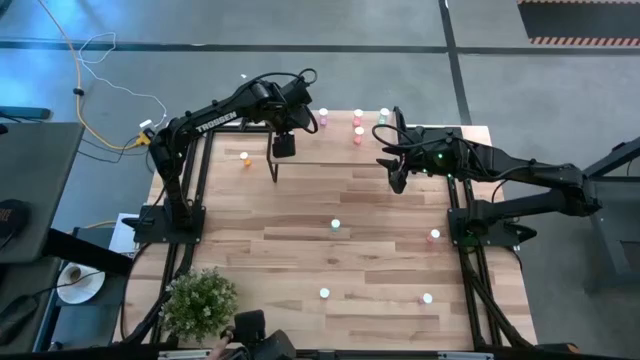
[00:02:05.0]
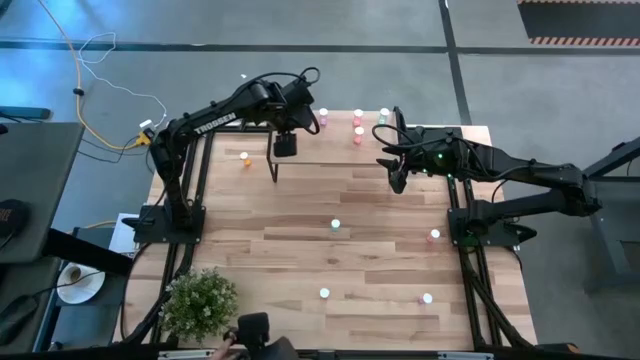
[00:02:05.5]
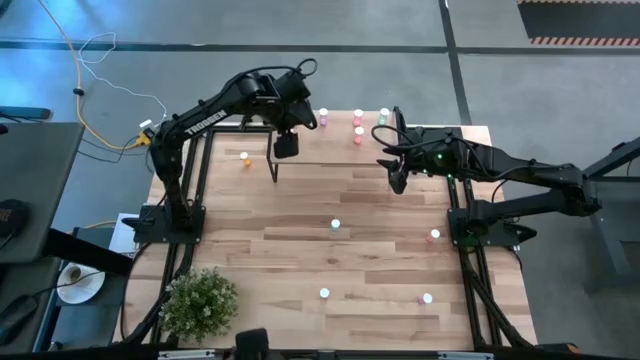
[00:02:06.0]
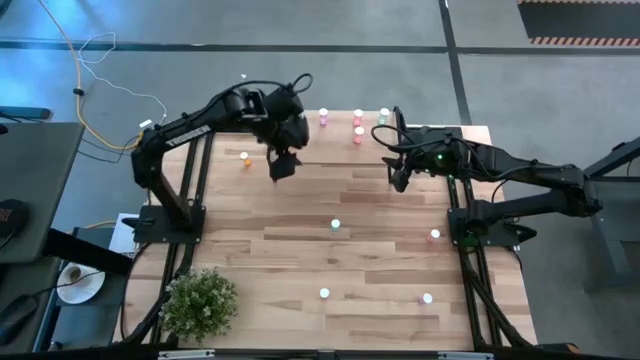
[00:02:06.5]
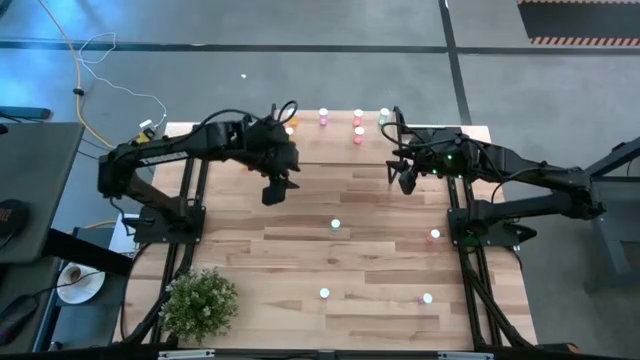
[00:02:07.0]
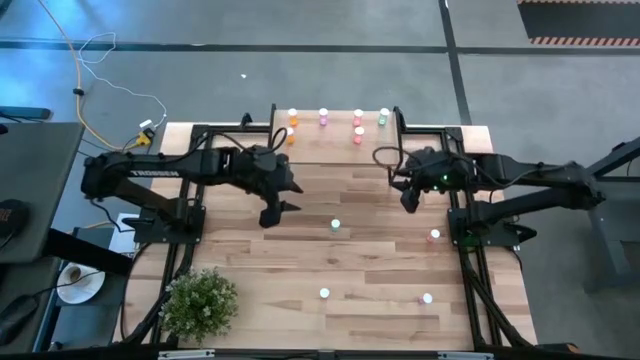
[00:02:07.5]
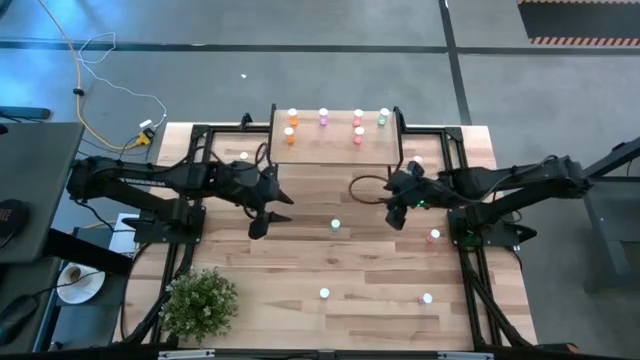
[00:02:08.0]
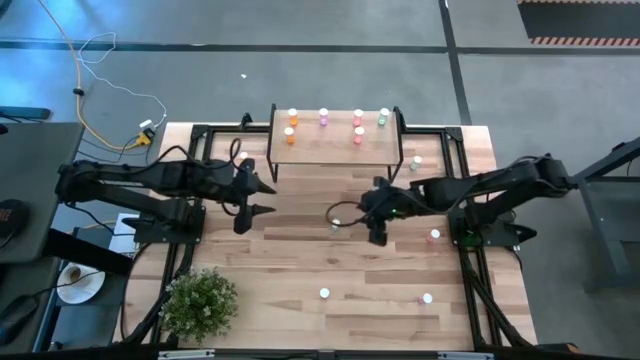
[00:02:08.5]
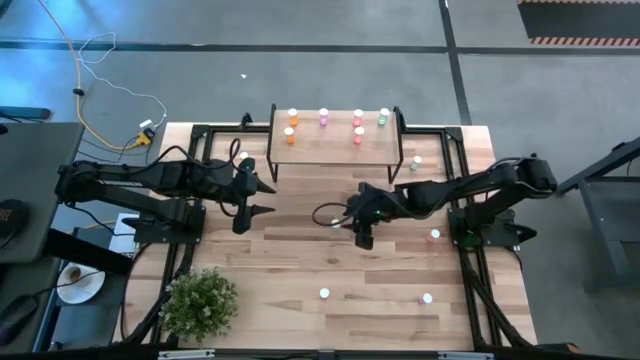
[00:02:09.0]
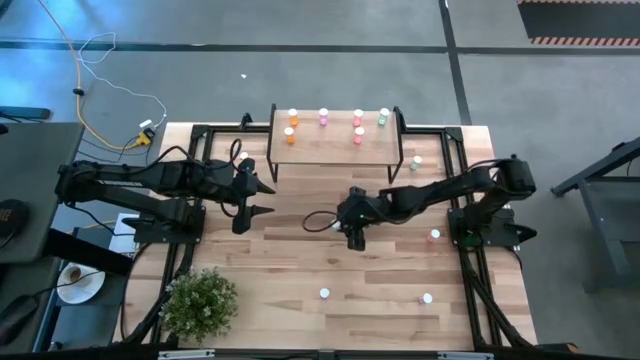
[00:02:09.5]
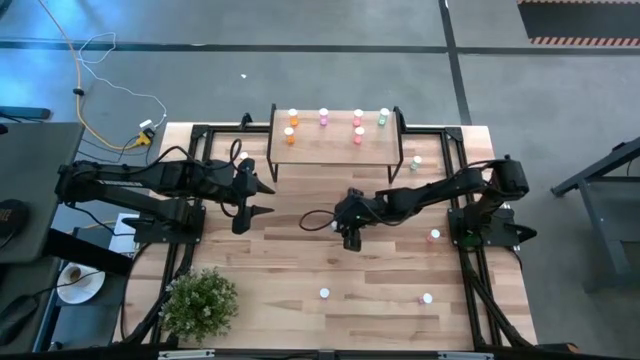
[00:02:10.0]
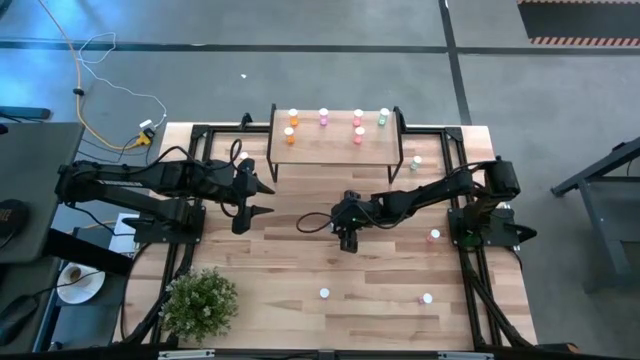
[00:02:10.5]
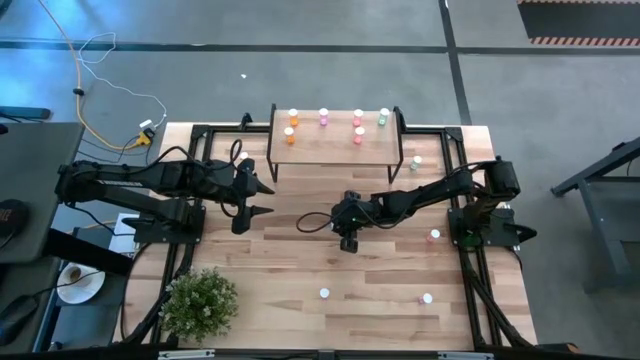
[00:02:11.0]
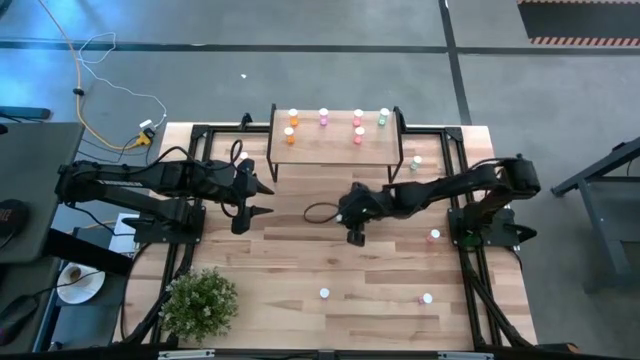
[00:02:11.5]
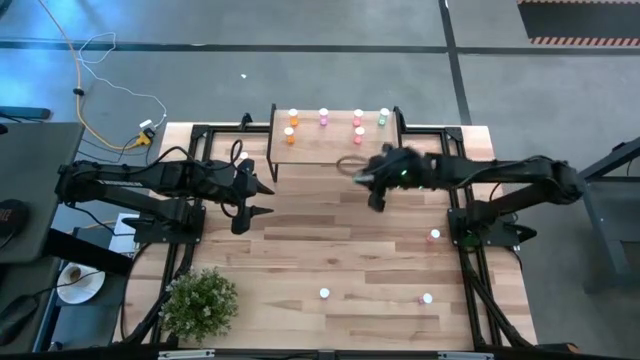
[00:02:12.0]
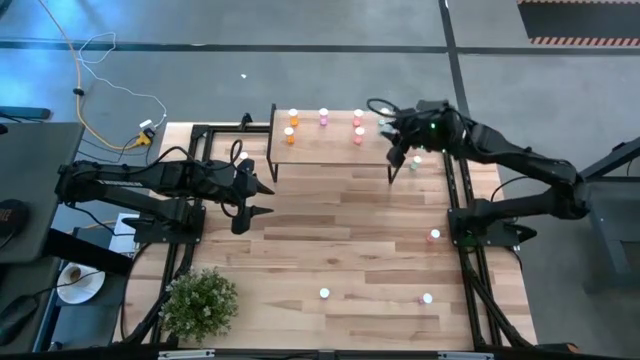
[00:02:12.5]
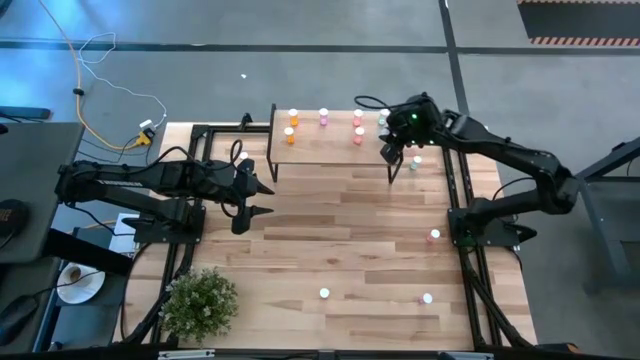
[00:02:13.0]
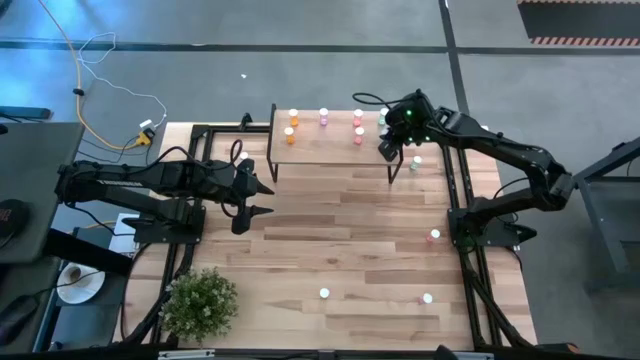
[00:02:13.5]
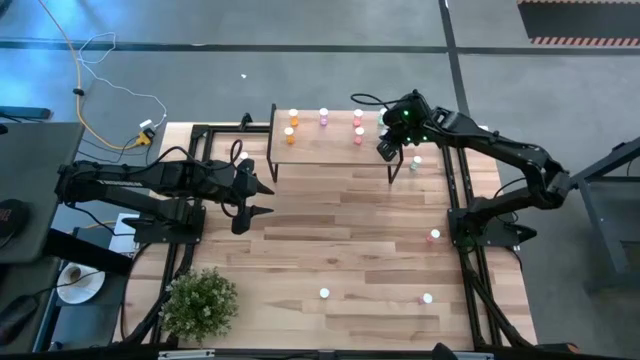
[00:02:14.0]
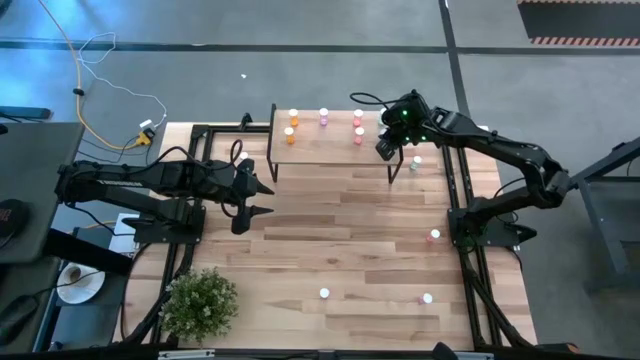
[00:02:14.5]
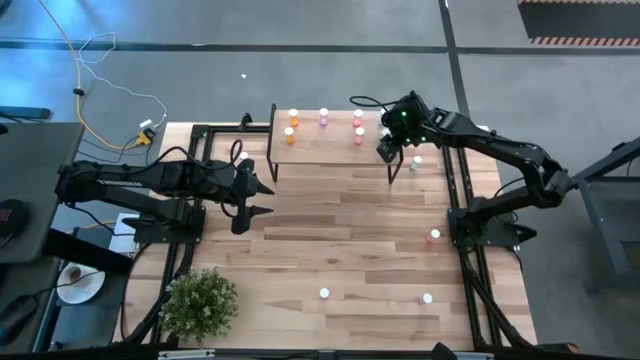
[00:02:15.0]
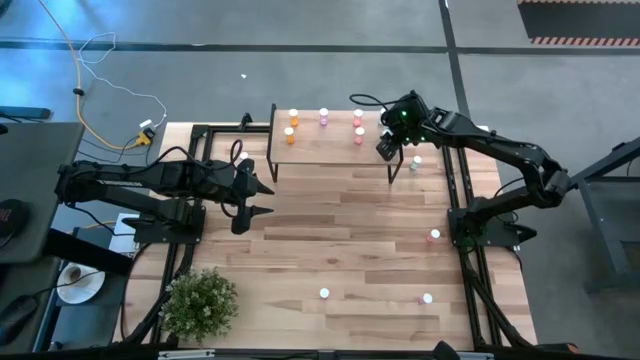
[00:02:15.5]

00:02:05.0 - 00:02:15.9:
Task: Pick and place medicine bottles onto shelf by color
Put the bottom blue pill bottle on the shelf aligned with the other blue pill bottle

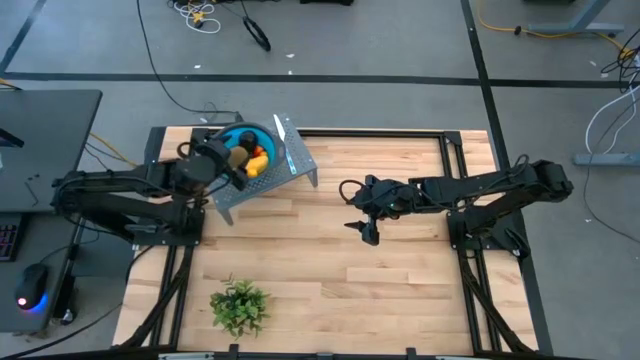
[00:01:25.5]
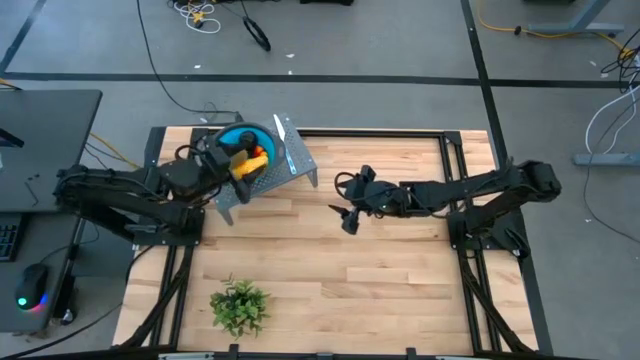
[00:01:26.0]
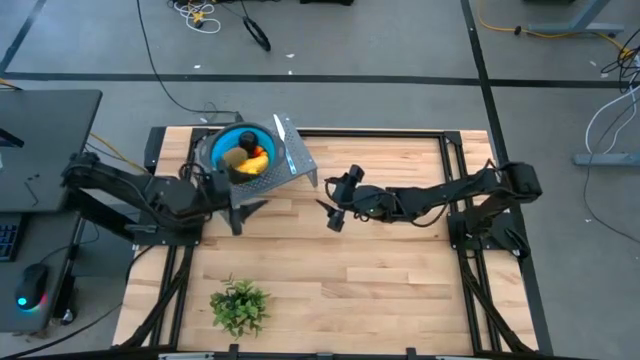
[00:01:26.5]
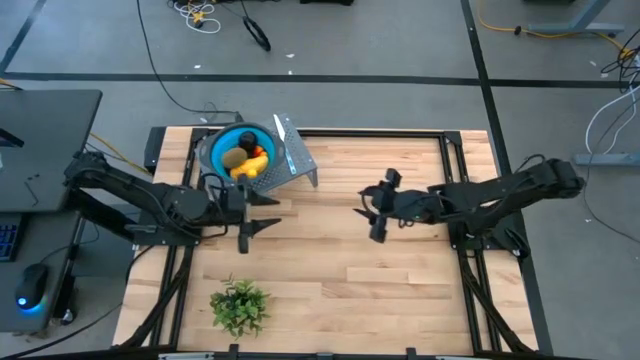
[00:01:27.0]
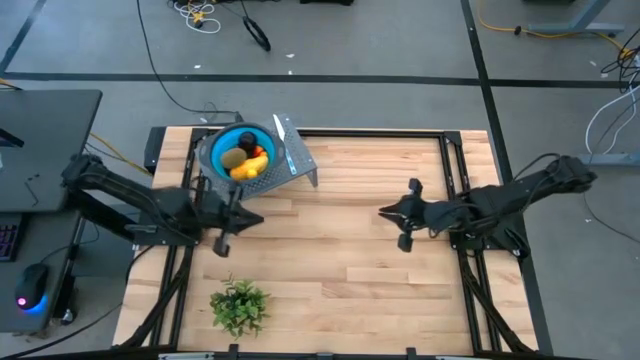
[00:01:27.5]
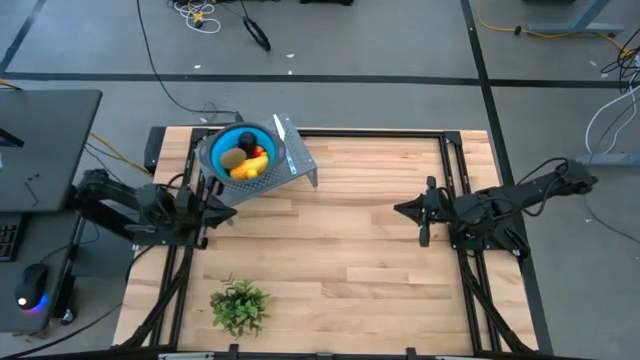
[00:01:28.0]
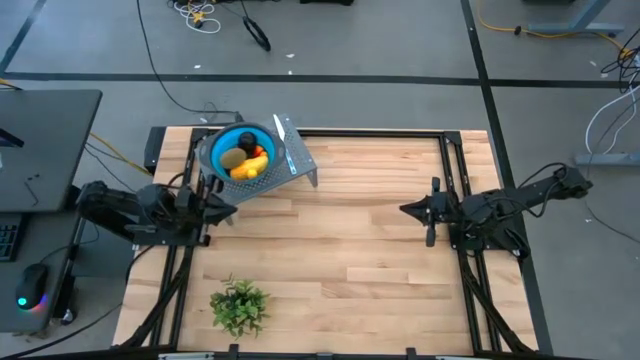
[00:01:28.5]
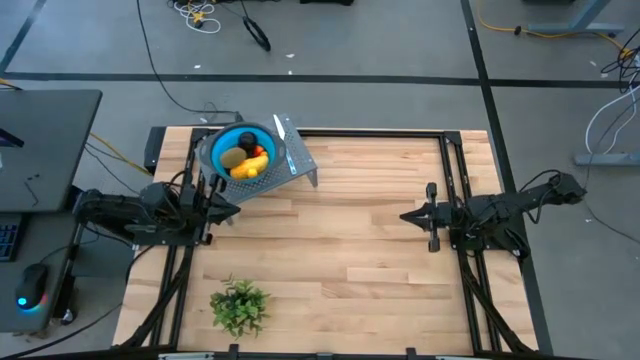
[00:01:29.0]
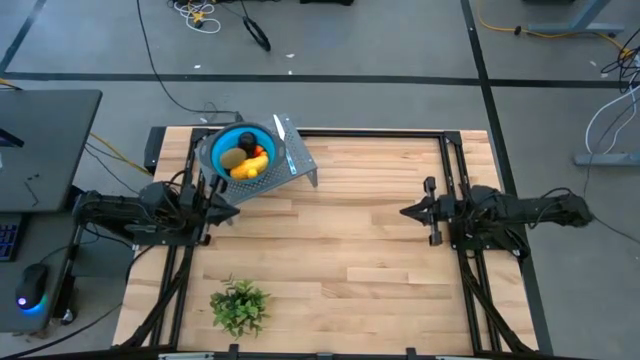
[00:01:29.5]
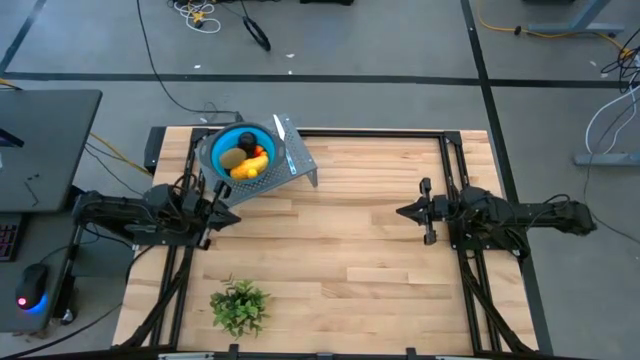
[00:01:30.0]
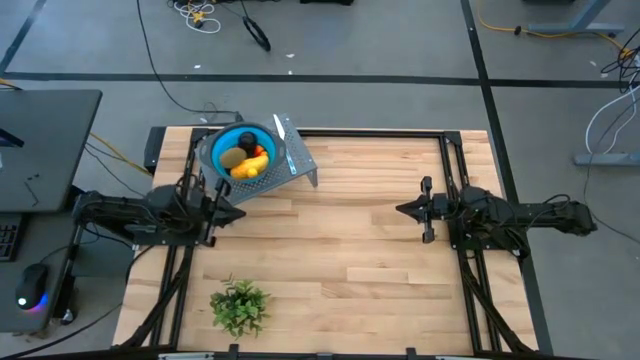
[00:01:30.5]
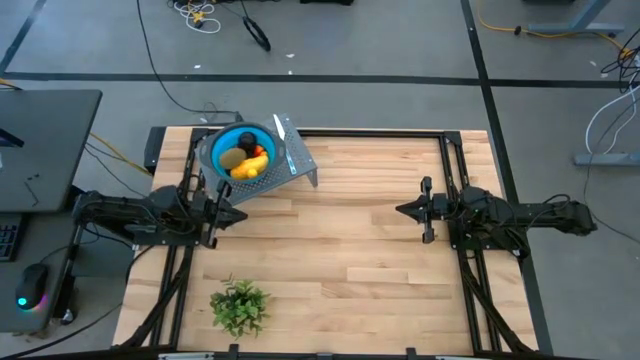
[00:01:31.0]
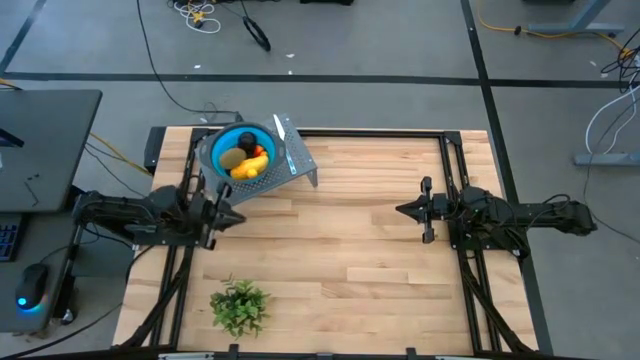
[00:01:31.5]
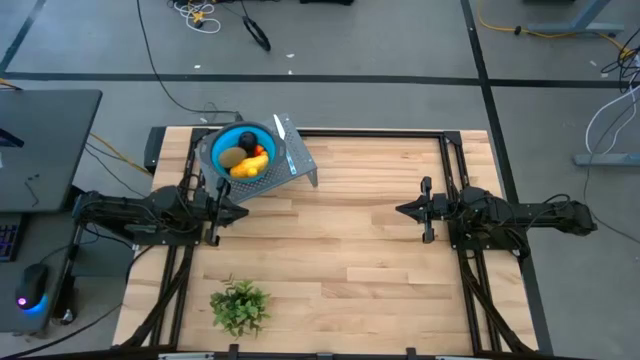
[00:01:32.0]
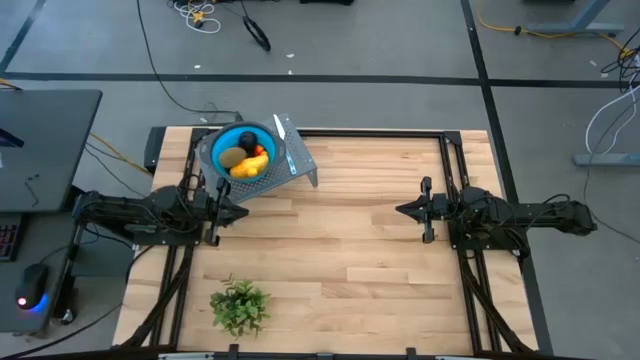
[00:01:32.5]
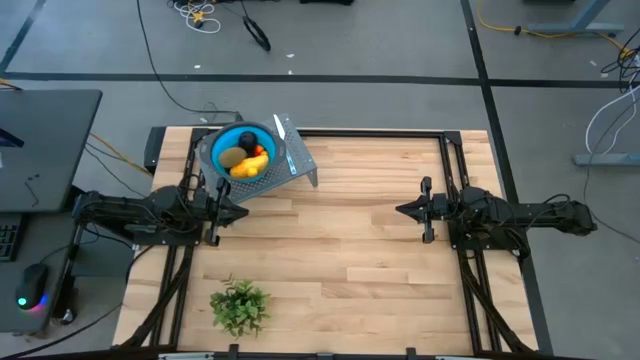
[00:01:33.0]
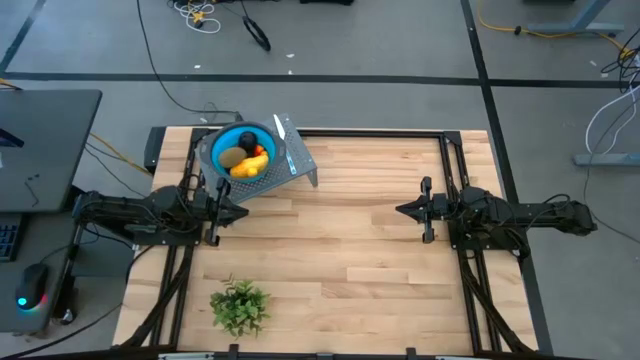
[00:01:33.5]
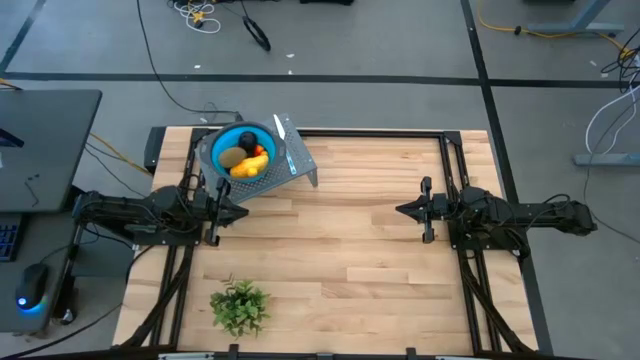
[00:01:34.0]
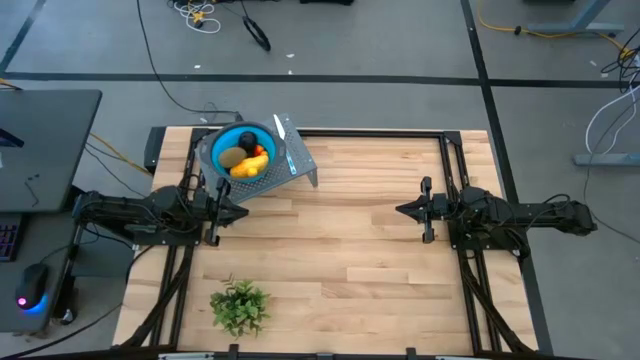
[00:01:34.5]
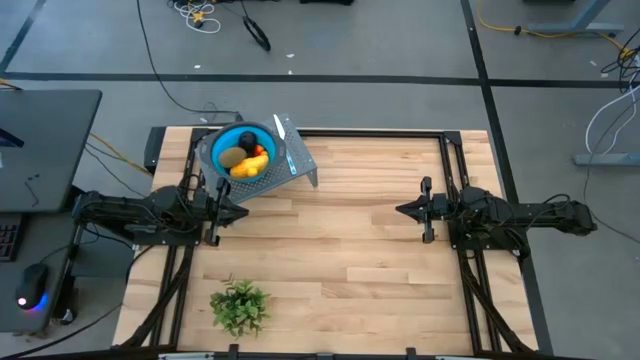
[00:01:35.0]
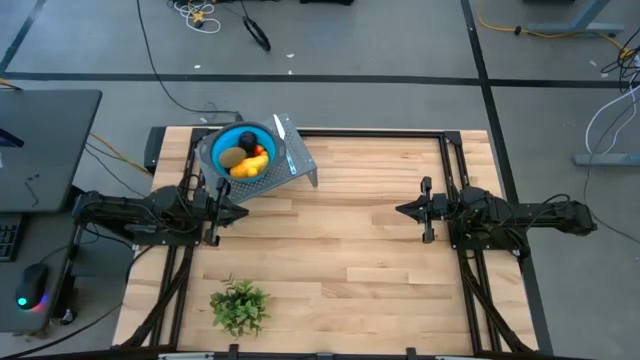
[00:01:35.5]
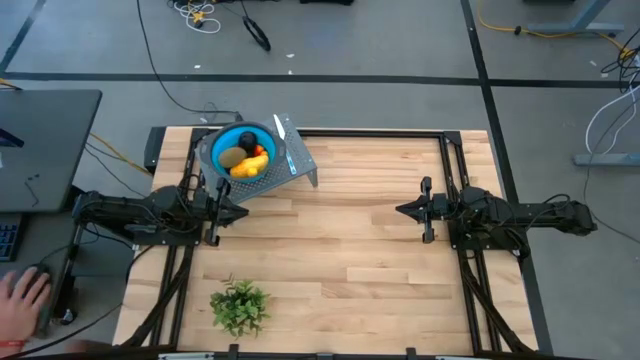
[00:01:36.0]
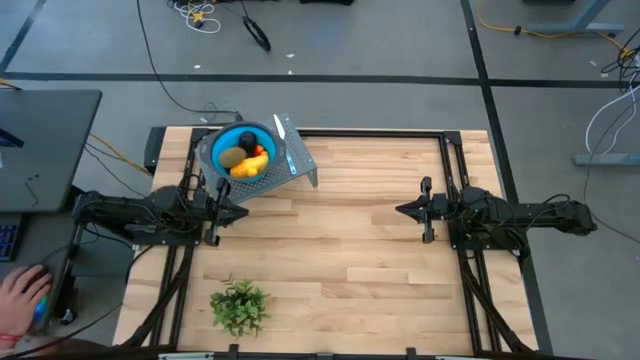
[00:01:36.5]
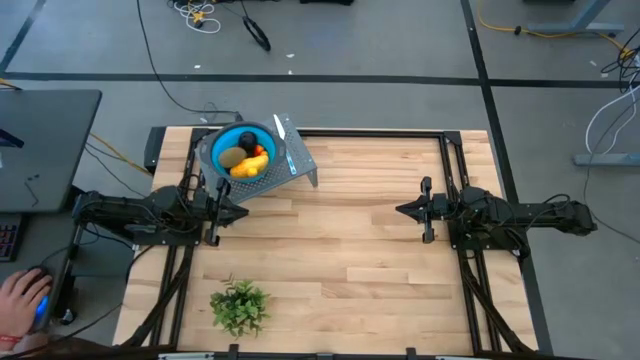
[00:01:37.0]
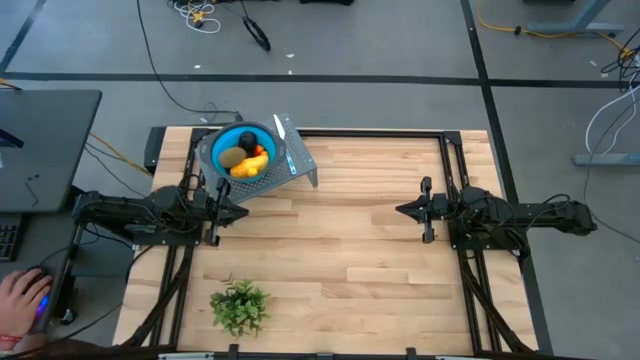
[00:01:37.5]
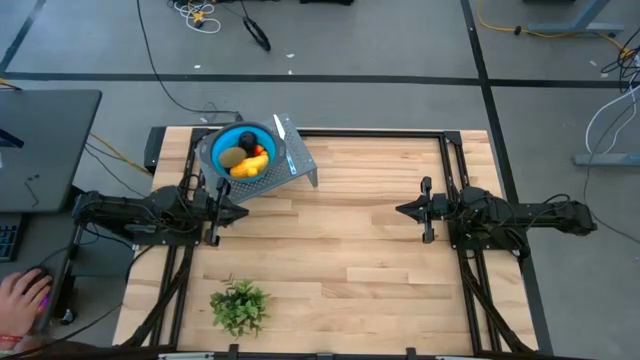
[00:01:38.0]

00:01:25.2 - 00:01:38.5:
Task: Pick & Place Fruit
Return to Home Position
